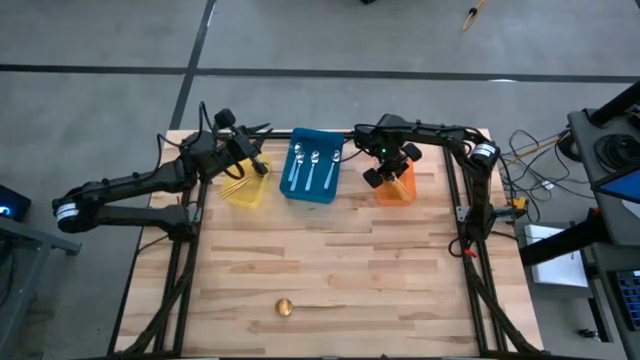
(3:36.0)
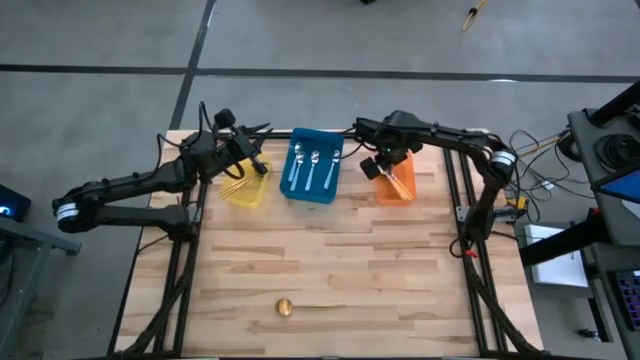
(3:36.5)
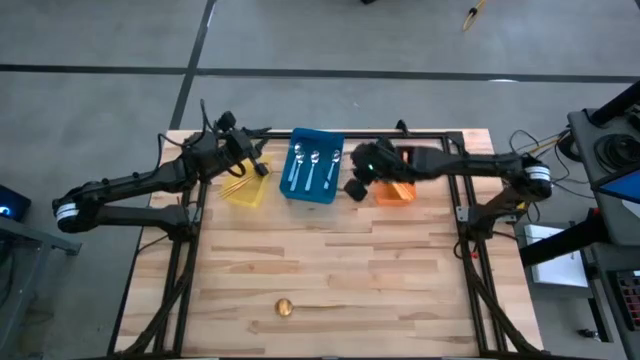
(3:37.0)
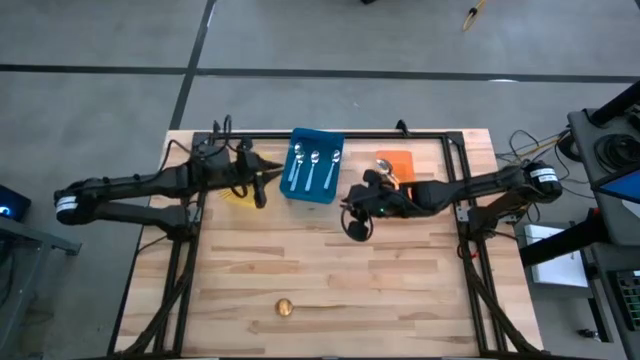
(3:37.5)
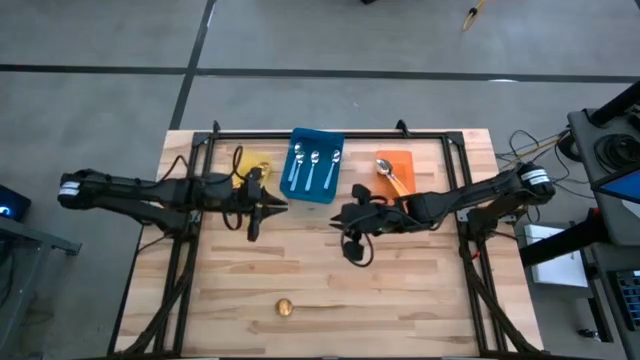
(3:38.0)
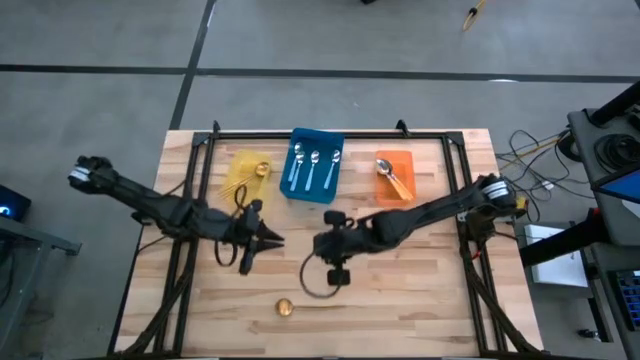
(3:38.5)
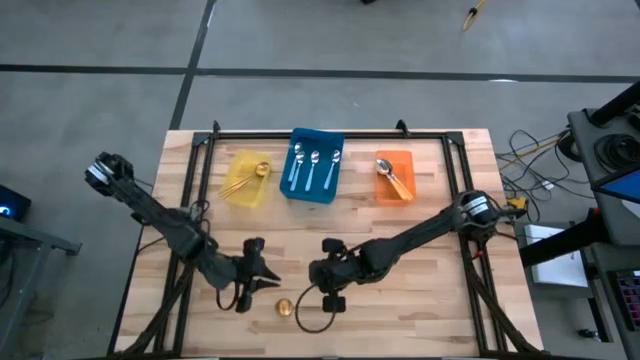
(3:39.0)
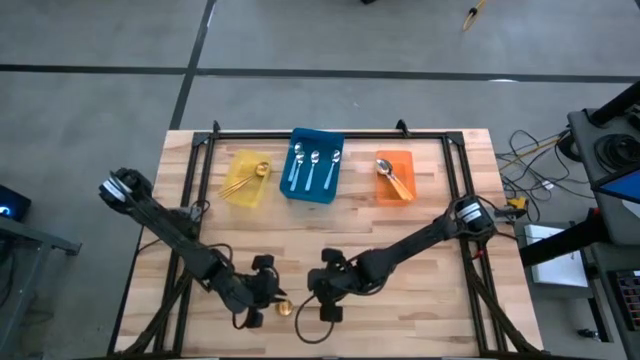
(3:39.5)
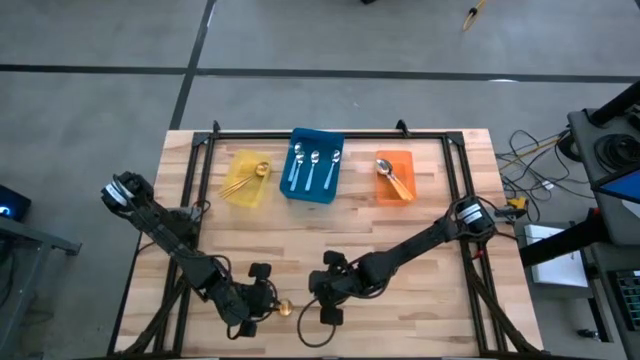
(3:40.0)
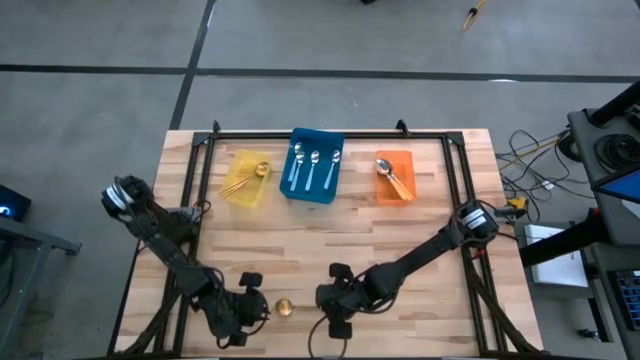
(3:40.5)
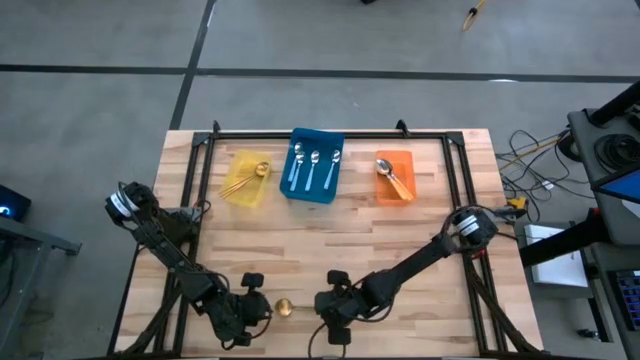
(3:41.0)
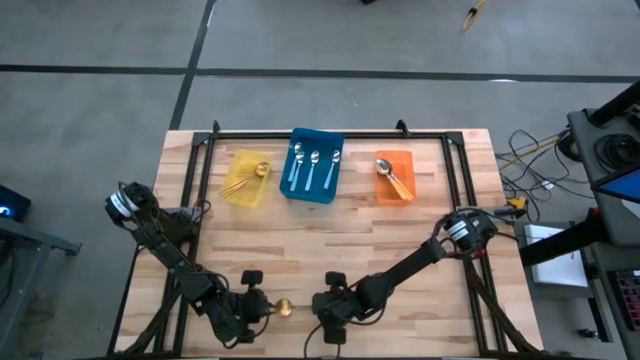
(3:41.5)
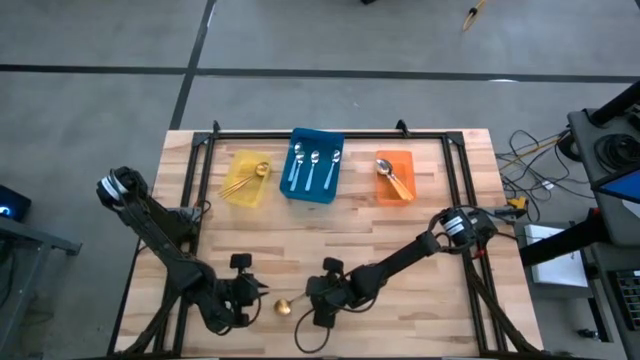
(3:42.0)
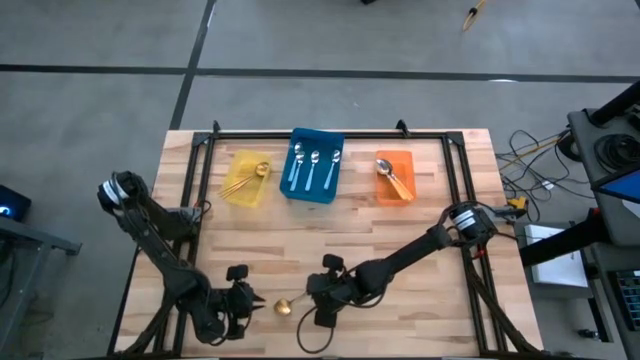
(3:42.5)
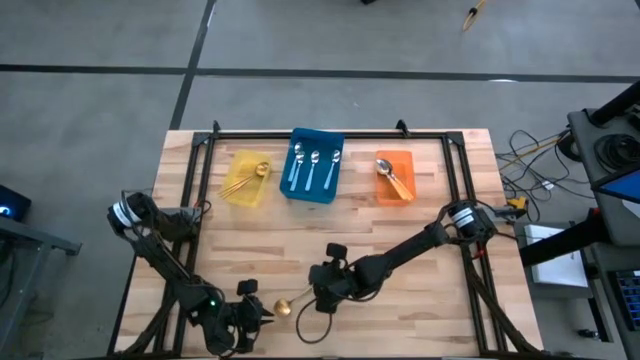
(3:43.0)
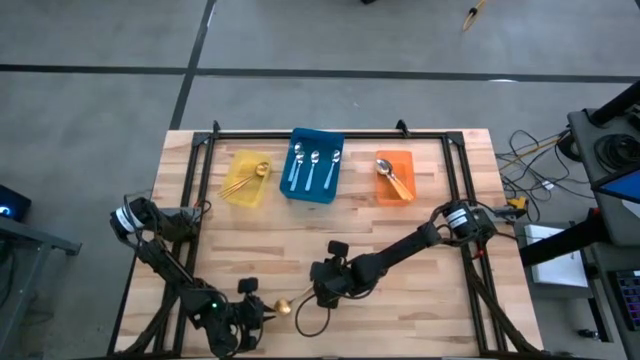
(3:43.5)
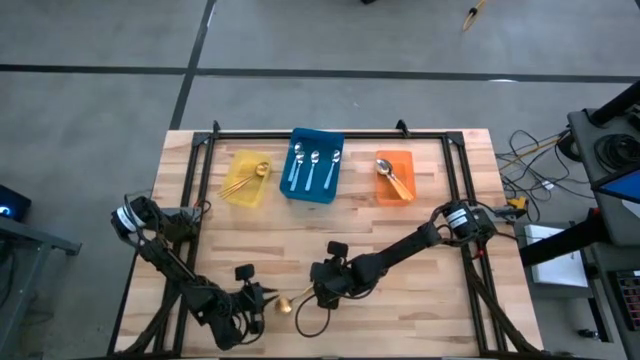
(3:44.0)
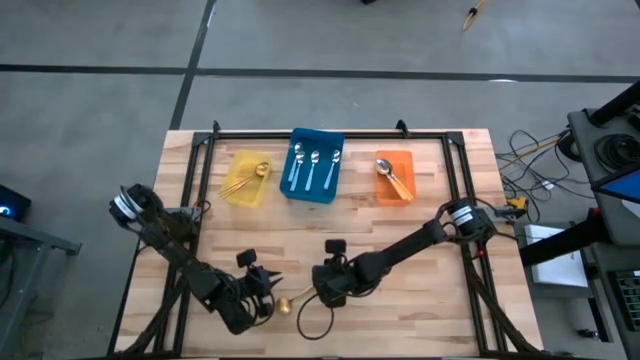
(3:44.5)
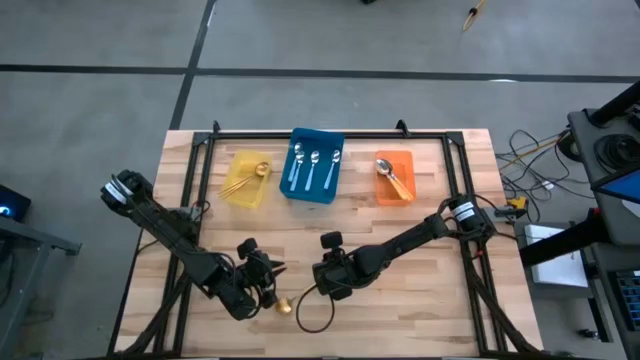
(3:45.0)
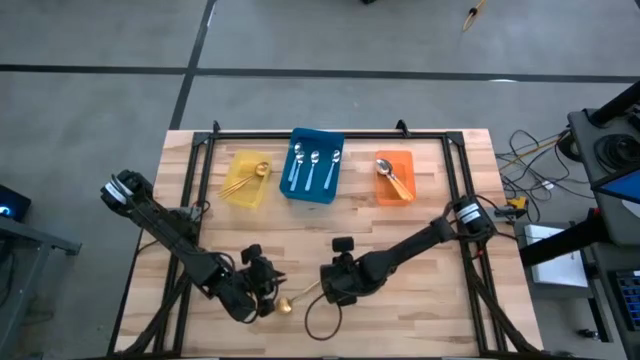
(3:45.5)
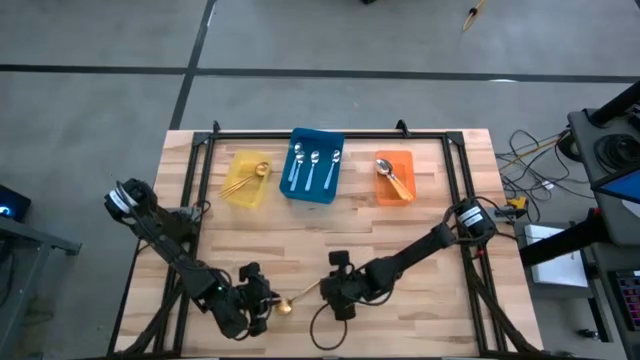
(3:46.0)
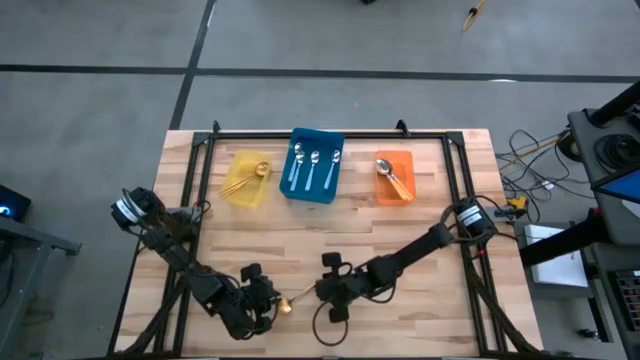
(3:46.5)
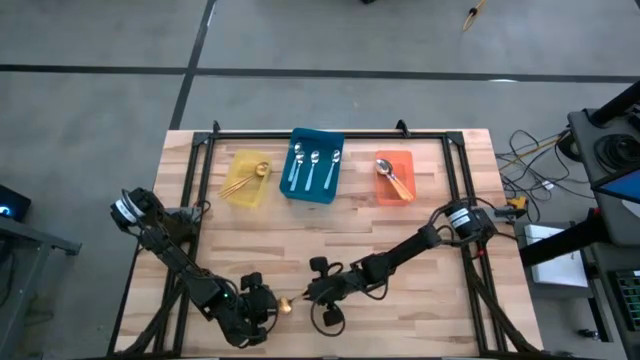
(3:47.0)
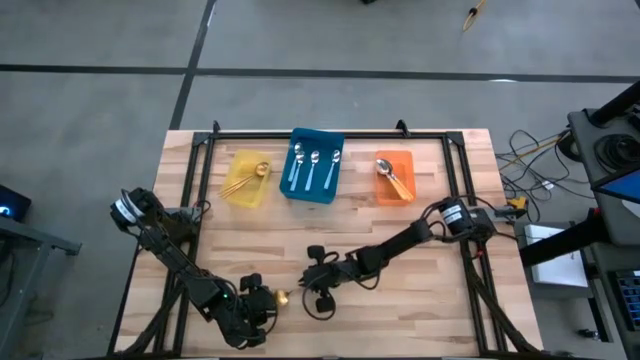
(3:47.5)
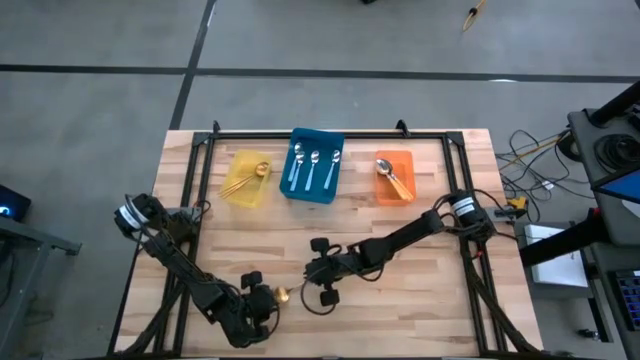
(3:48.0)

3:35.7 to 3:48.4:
Task: Sort silverware by color (type)
Put the gold spoon into the yellow bin

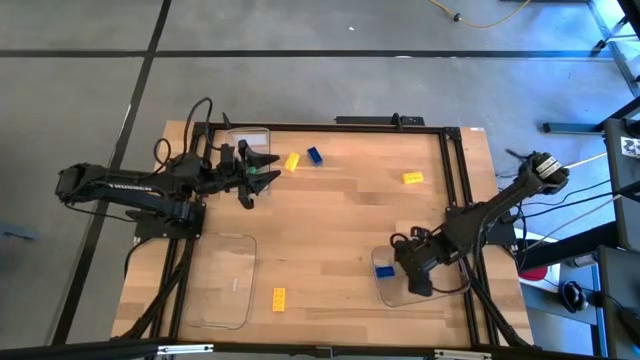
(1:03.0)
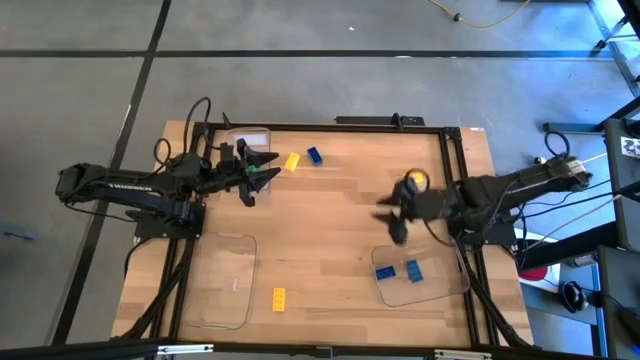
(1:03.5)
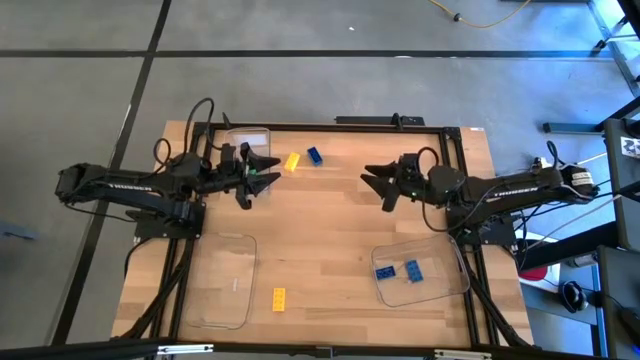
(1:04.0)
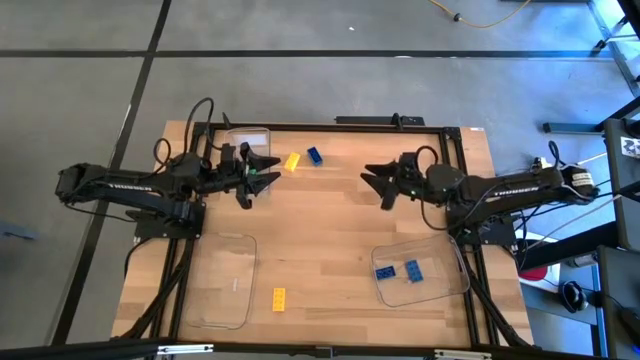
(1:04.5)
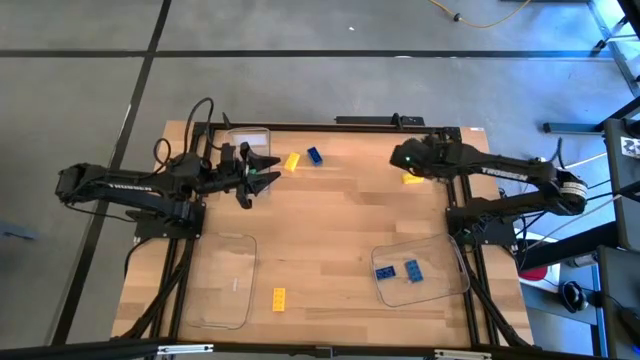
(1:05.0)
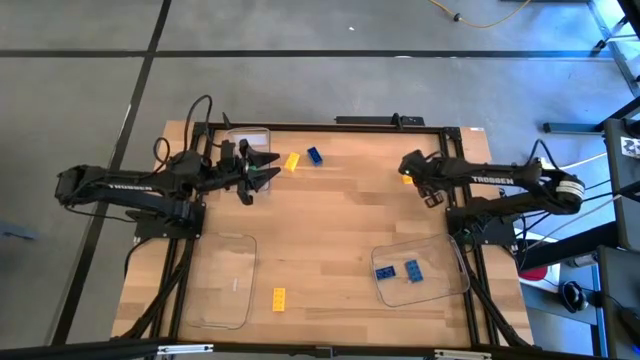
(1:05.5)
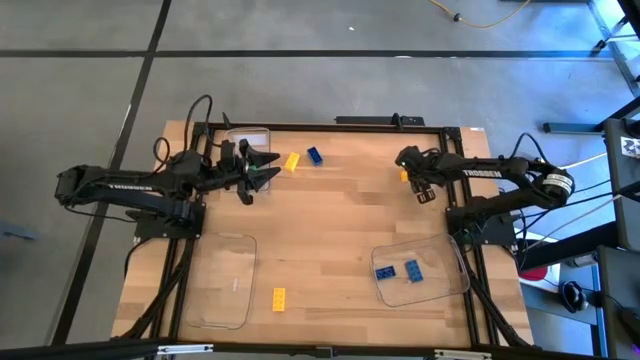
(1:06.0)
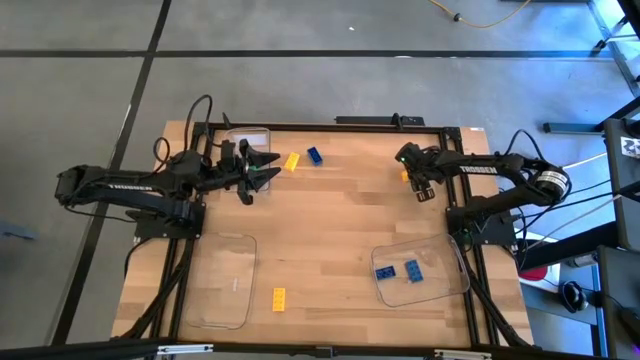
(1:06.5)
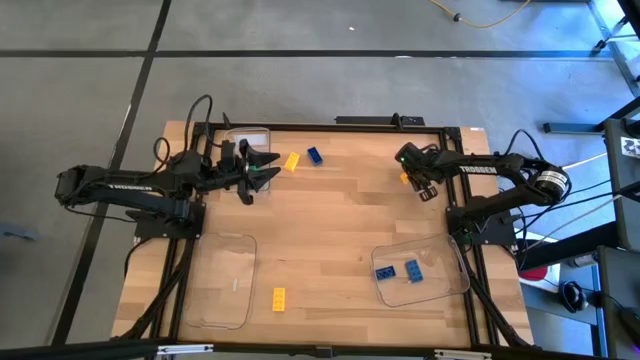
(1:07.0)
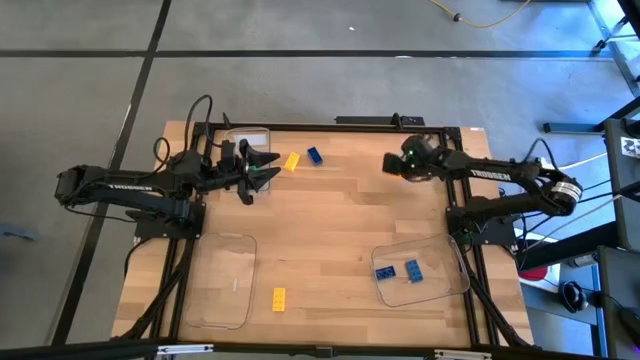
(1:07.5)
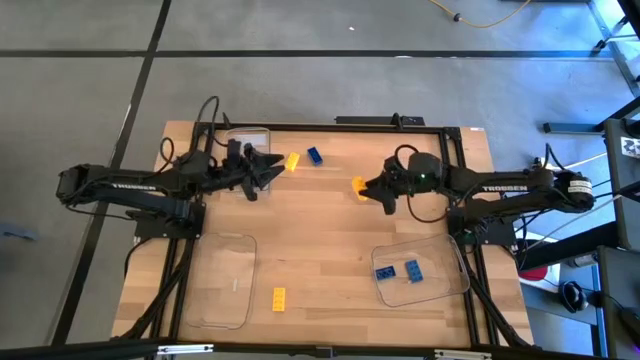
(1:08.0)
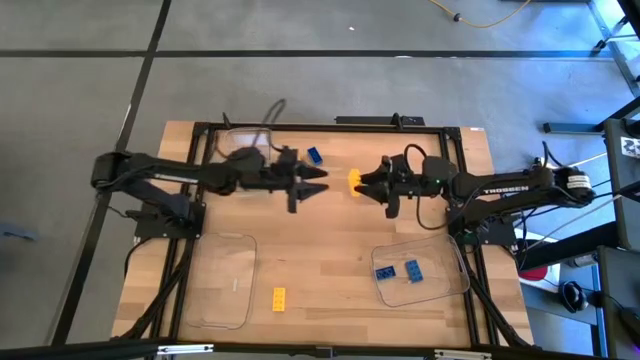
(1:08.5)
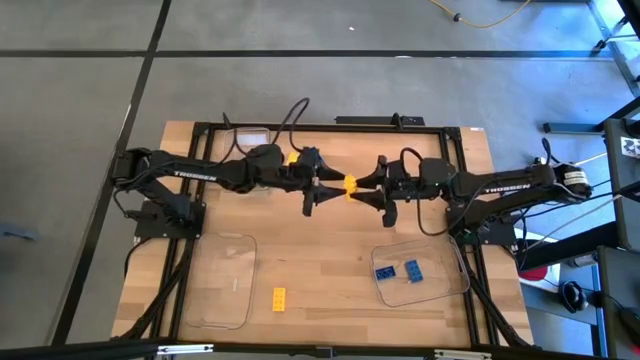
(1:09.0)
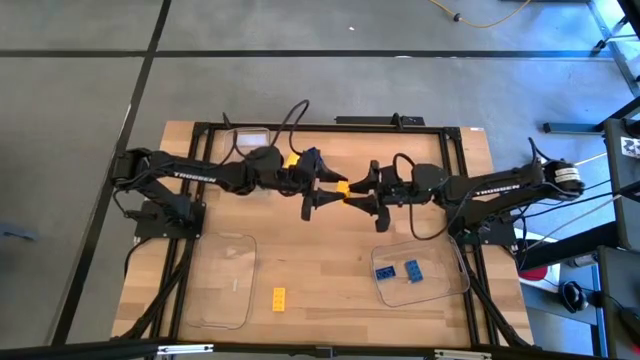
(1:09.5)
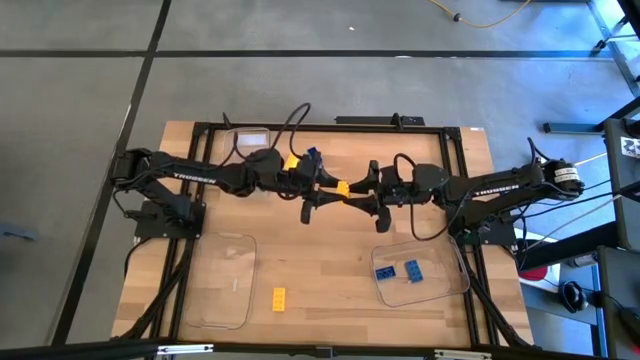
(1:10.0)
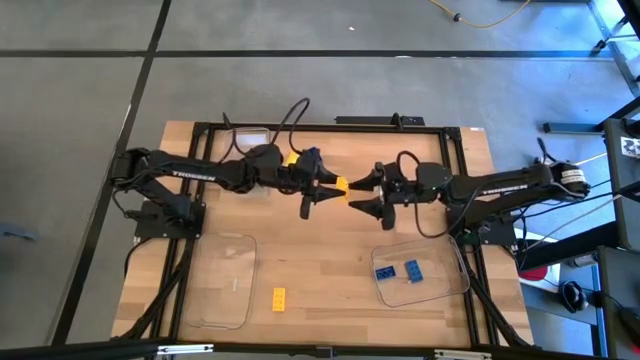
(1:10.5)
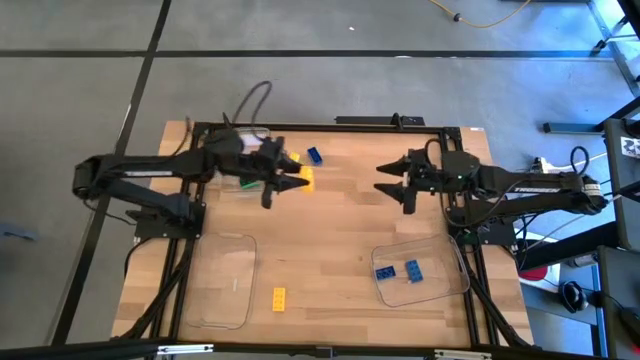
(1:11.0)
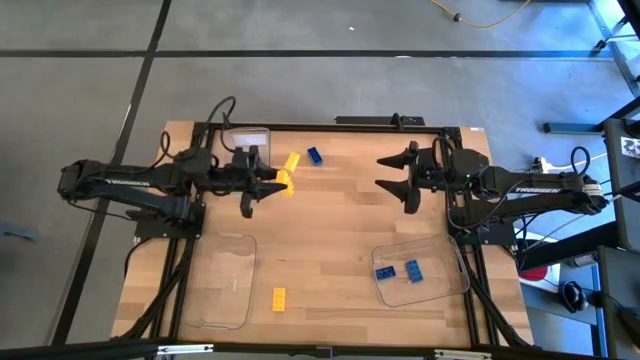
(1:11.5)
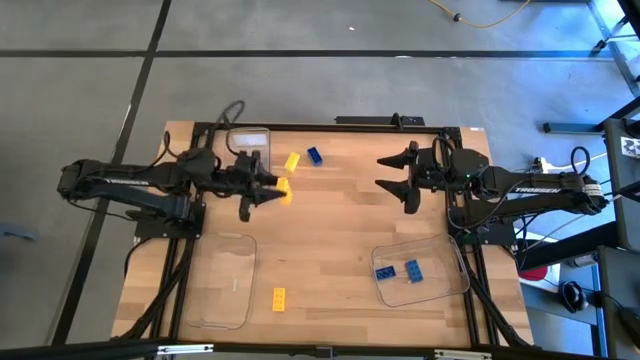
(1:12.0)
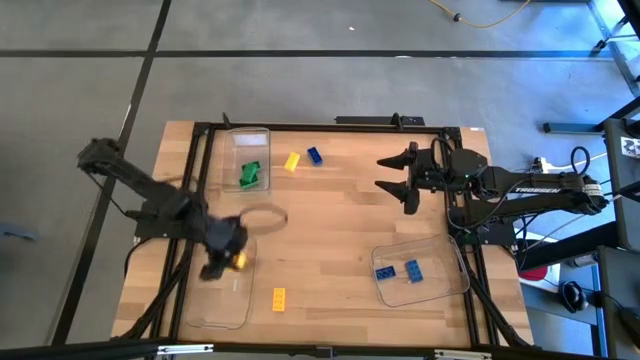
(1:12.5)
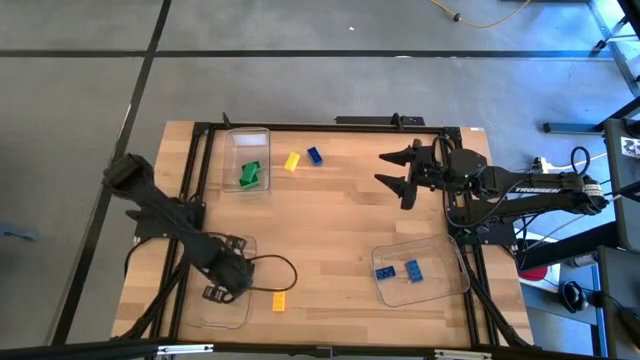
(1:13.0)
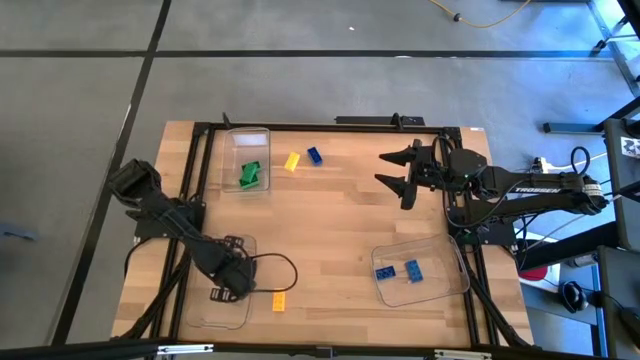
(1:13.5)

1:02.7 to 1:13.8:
Task: Sort & place blocks by color
Put the top right yellow game piece into the bottom left transparent bin
